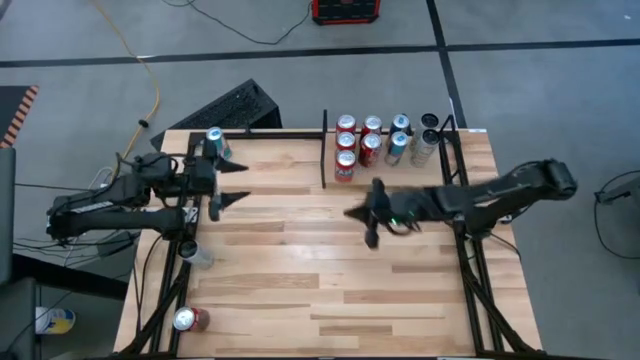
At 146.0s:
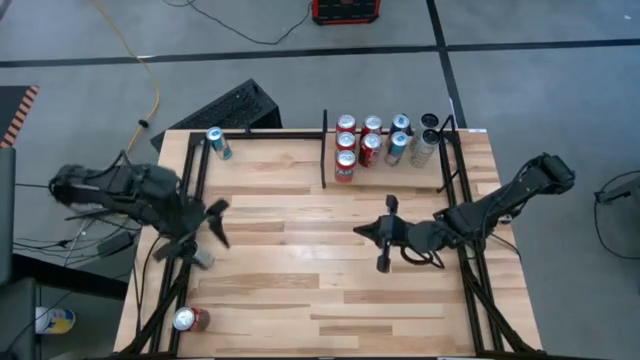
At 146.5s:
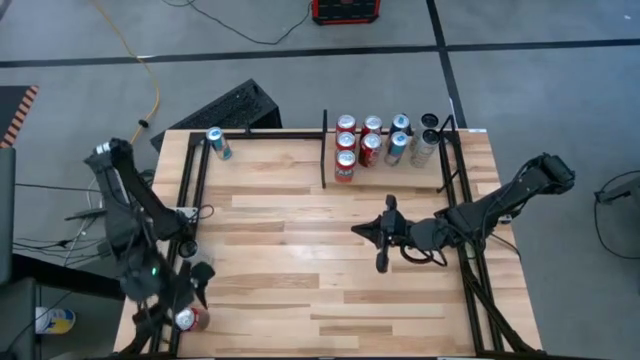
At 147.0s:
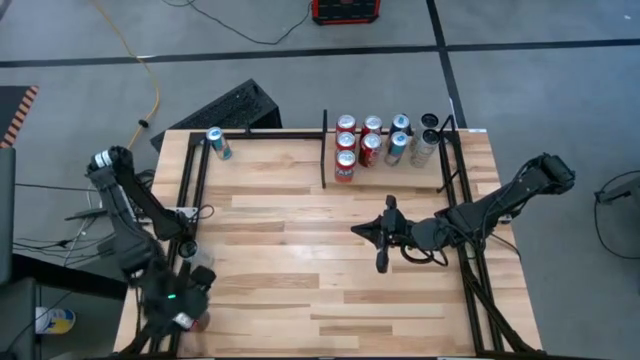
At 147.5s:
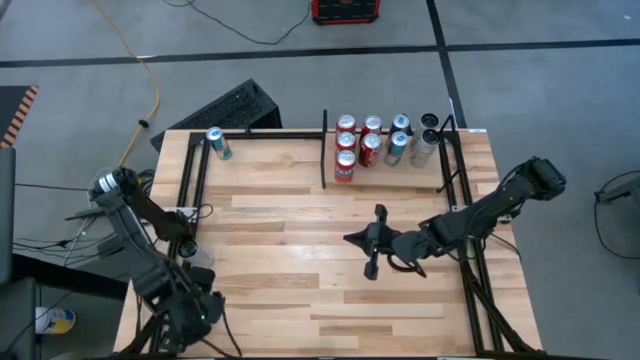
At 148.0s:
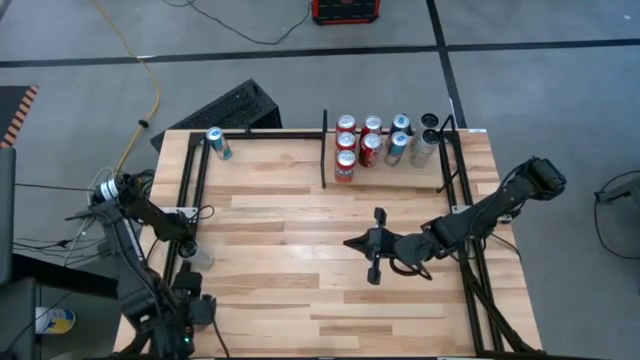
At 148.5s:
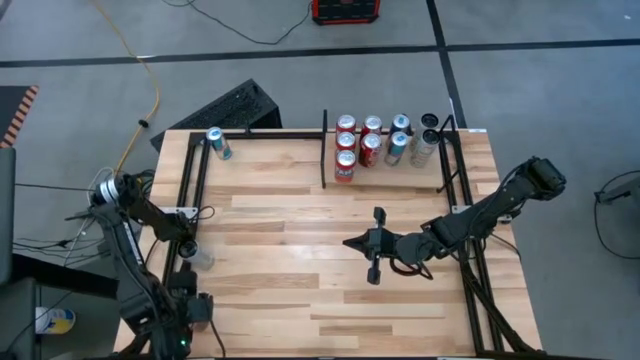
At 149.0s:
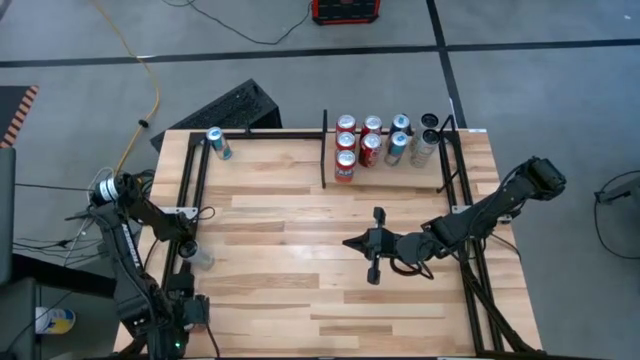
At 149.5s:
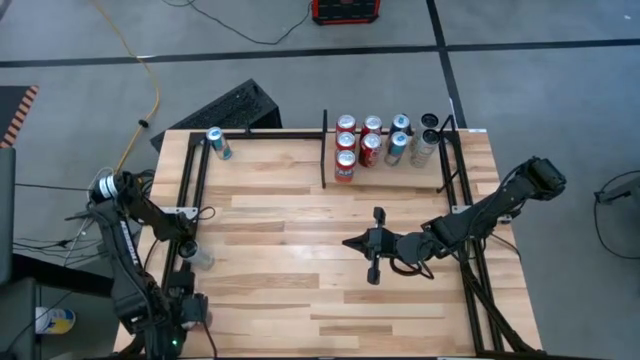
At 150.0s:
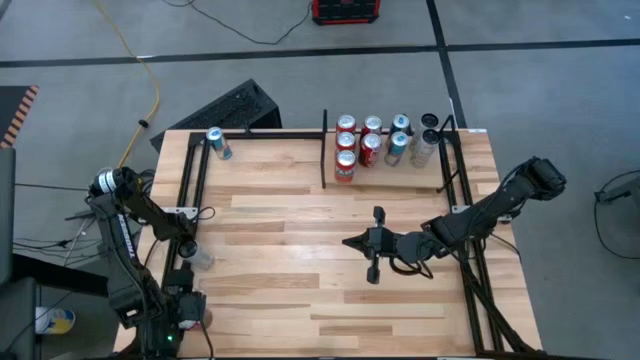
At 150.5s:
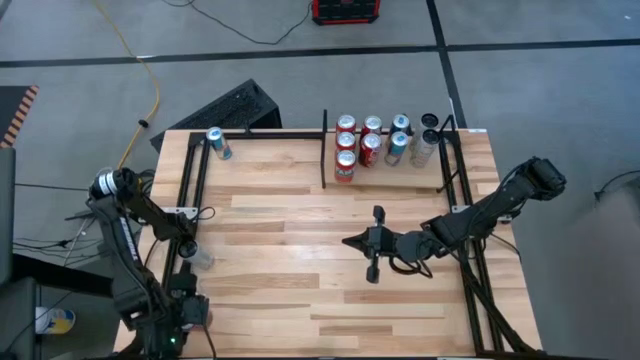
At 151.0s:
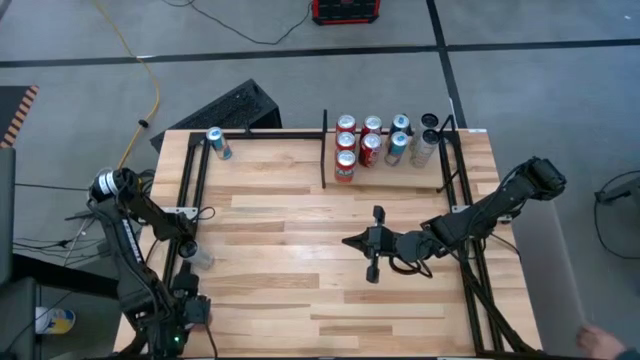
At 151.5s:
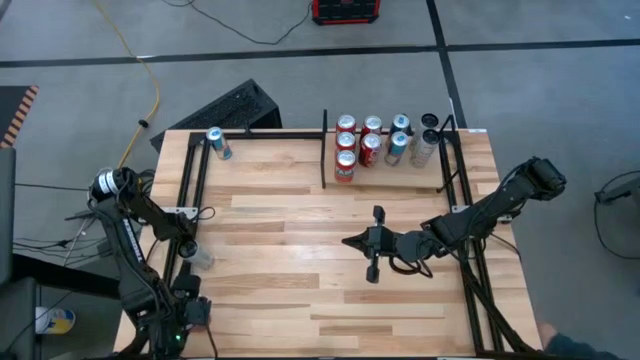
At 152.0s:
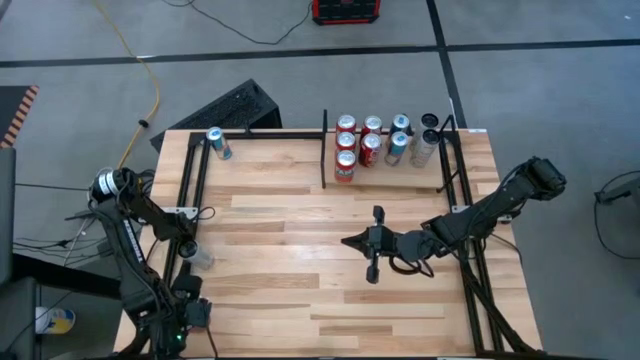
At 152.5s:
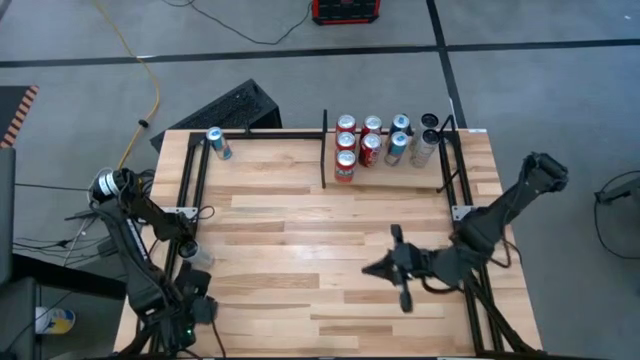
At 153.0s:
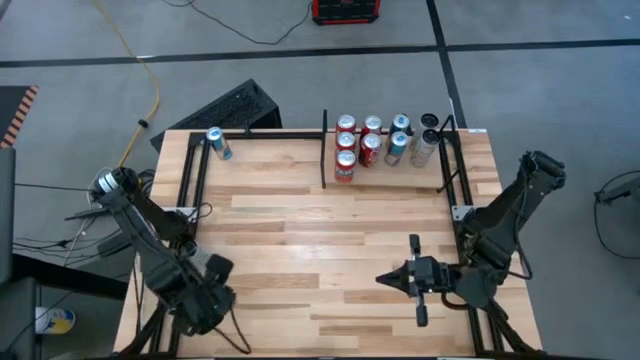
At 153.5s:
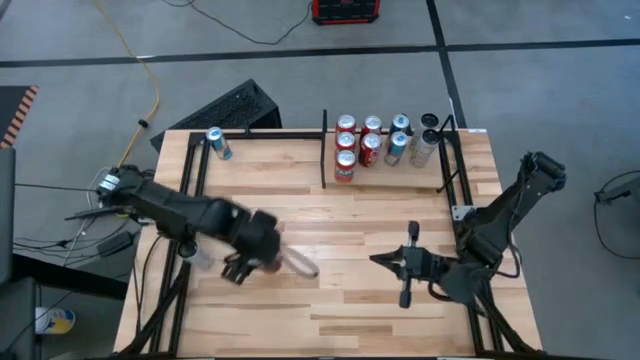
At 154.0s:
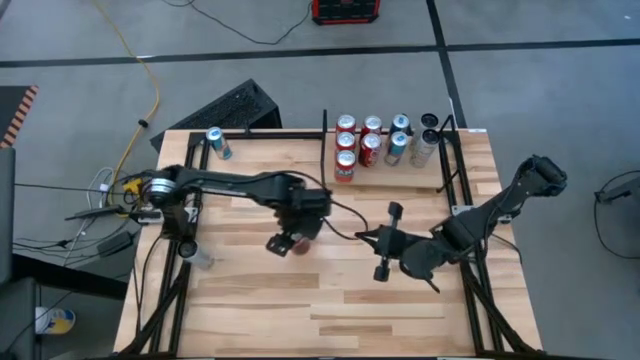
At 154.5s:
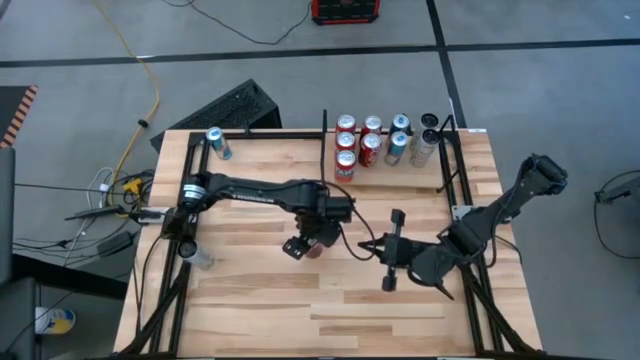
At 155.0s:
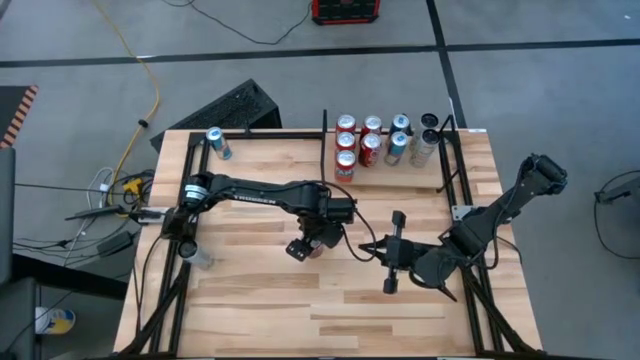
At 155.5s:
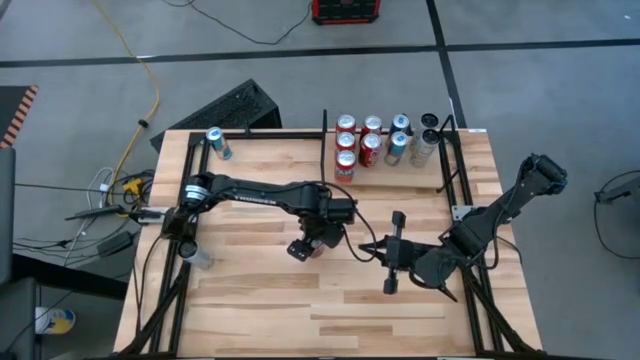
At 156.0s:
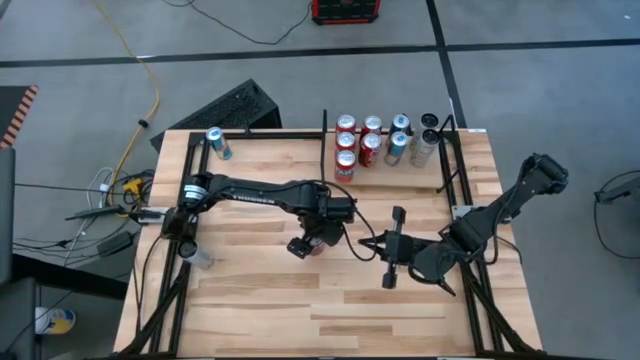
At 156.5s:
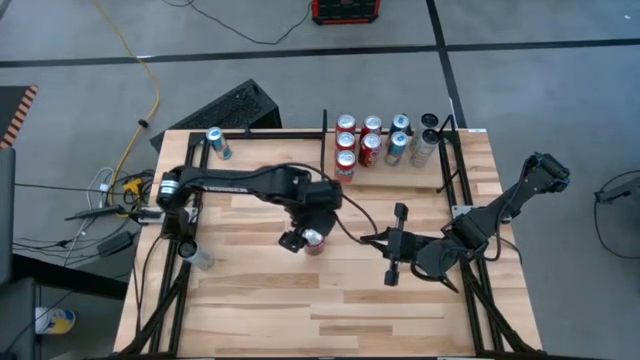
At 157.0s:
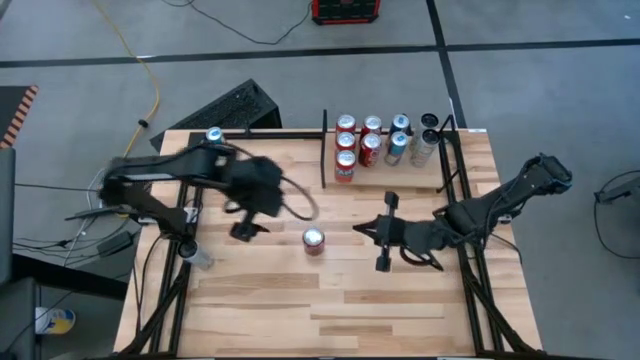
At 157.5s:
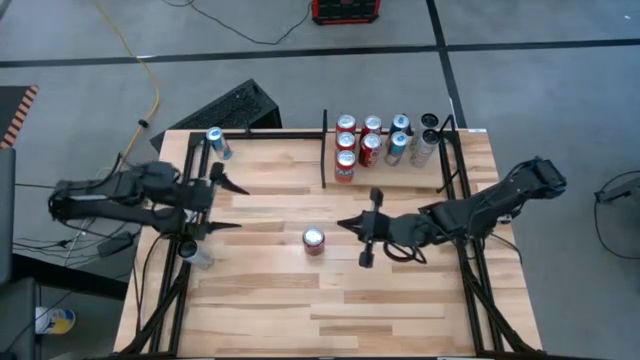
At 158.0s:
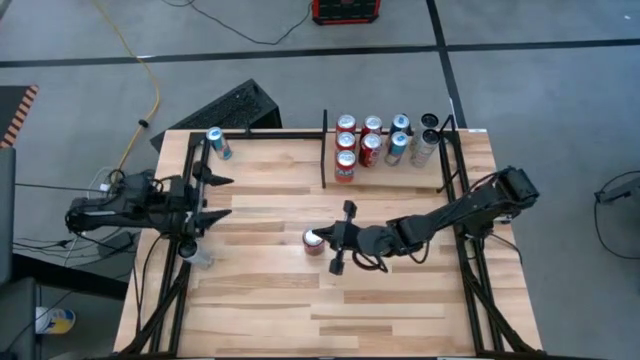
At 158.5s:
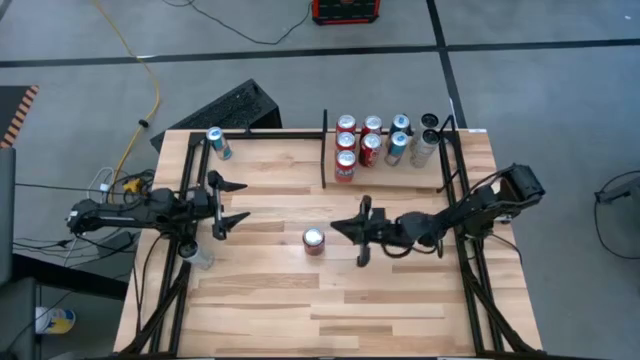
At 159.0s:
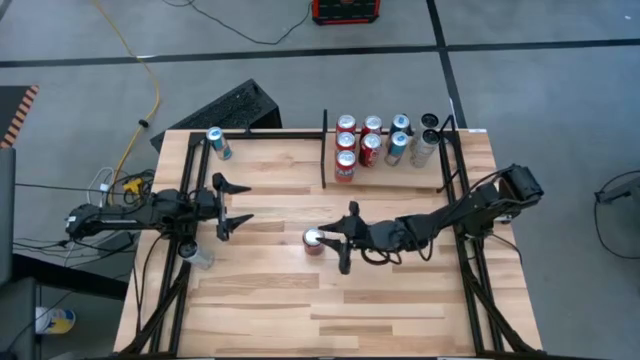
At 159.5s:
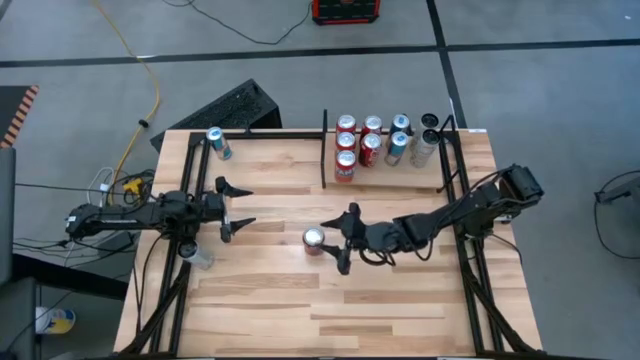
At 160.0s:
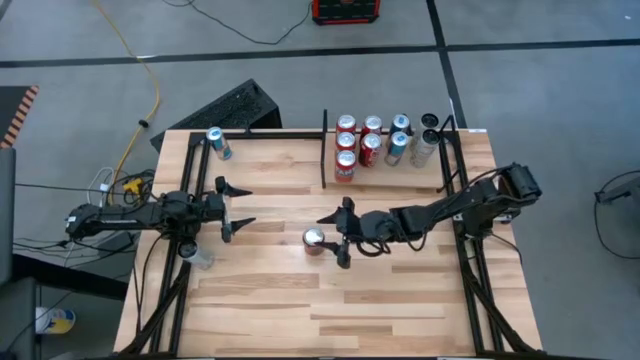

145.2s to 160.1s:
Task: Place canned beverage on shelf
Put the red-white soda can on the shelf aligned with the other soda cans

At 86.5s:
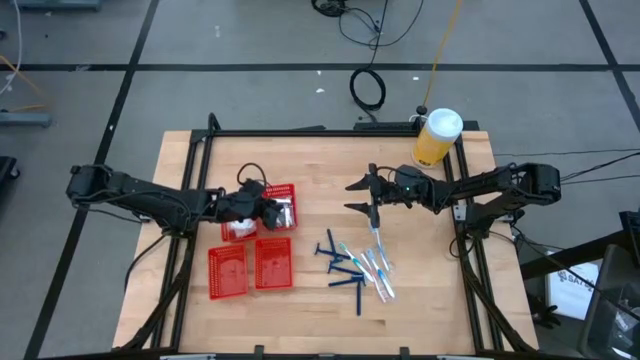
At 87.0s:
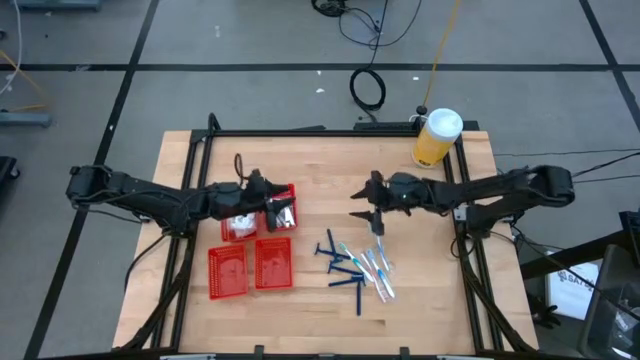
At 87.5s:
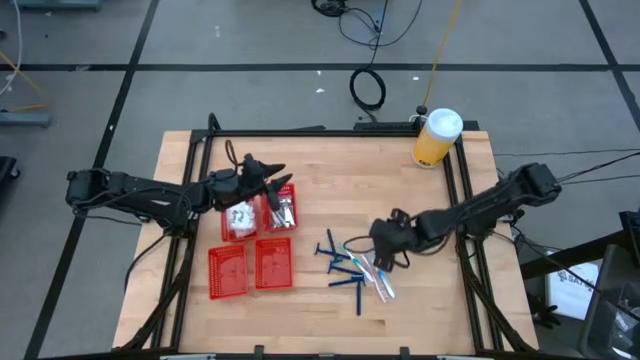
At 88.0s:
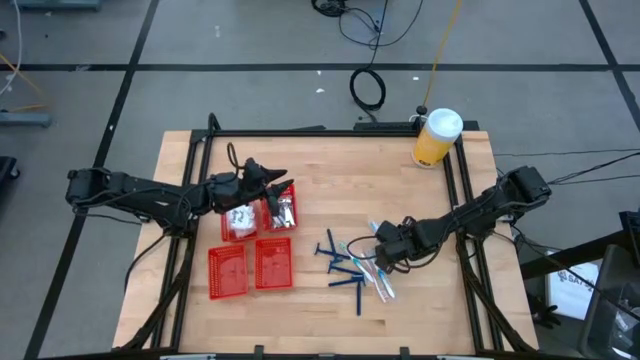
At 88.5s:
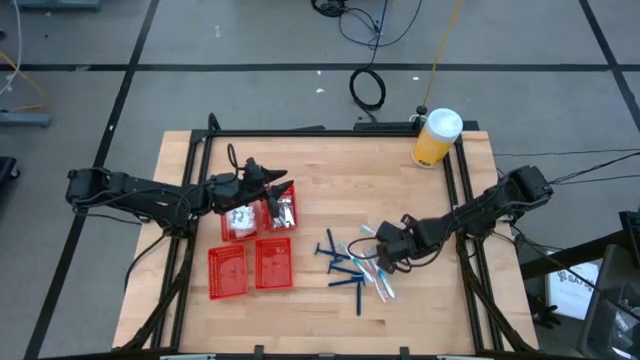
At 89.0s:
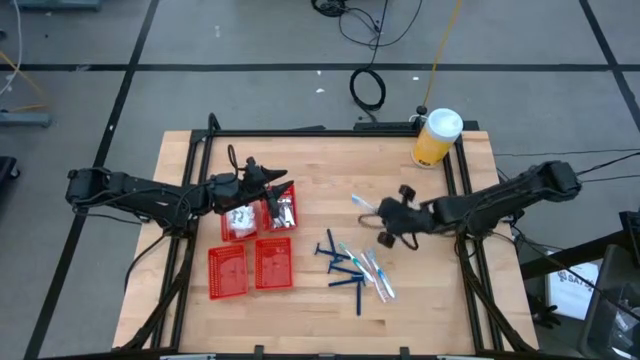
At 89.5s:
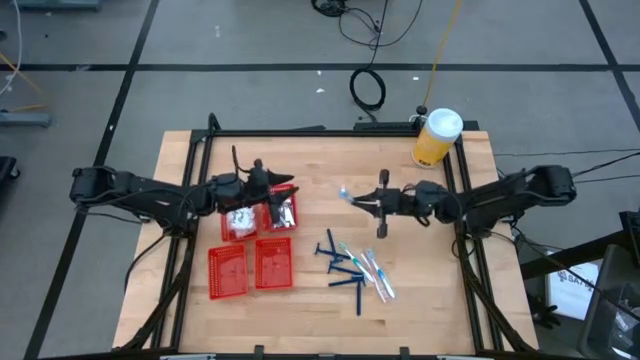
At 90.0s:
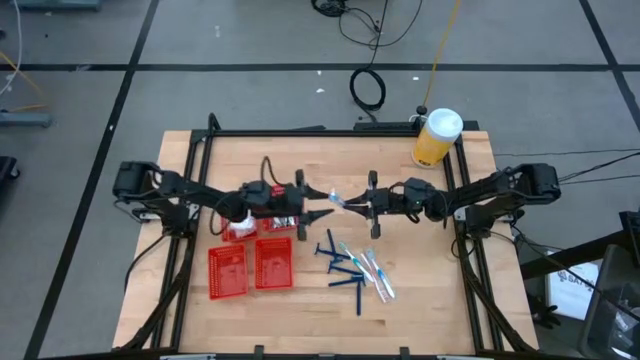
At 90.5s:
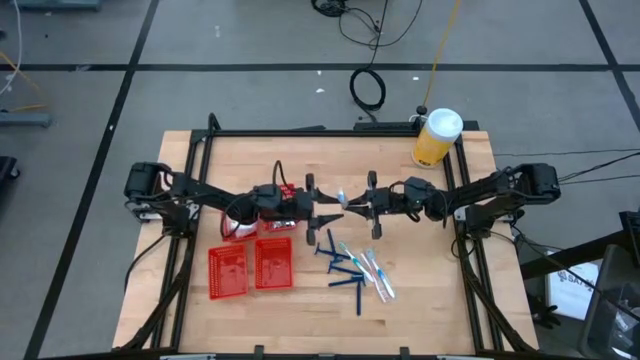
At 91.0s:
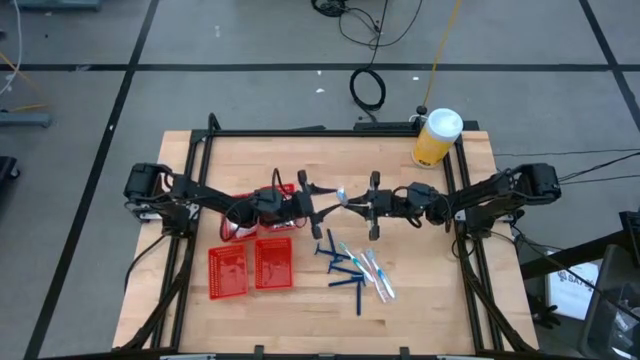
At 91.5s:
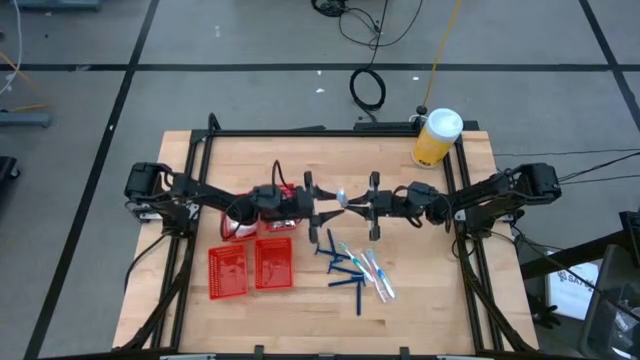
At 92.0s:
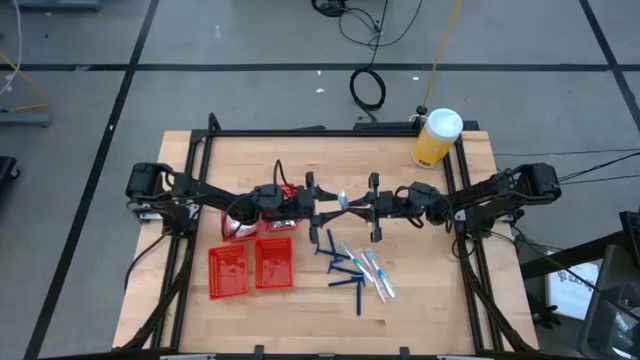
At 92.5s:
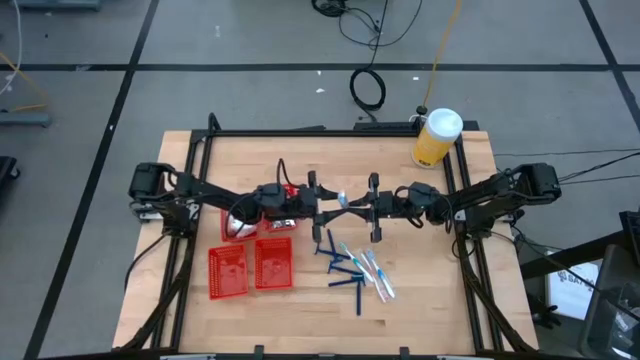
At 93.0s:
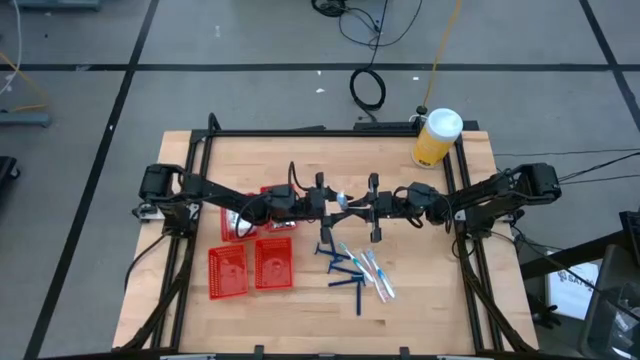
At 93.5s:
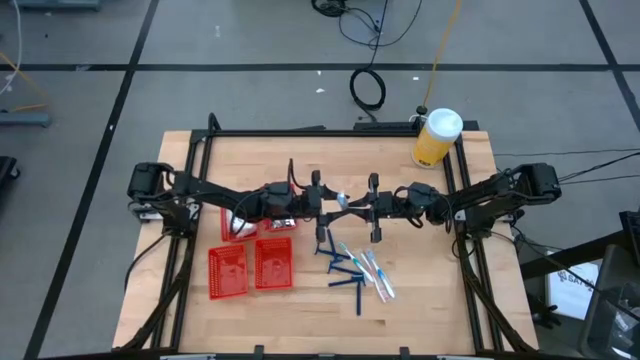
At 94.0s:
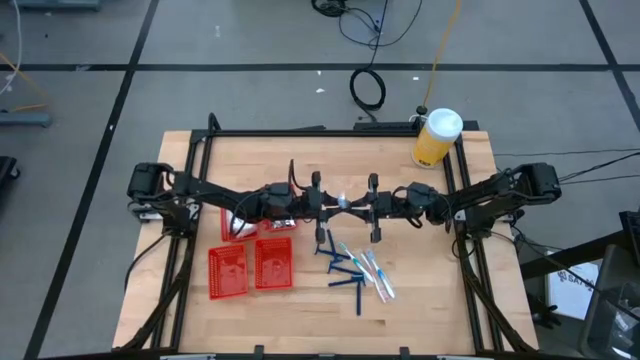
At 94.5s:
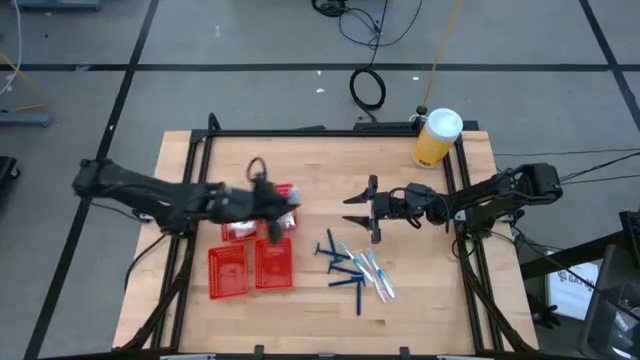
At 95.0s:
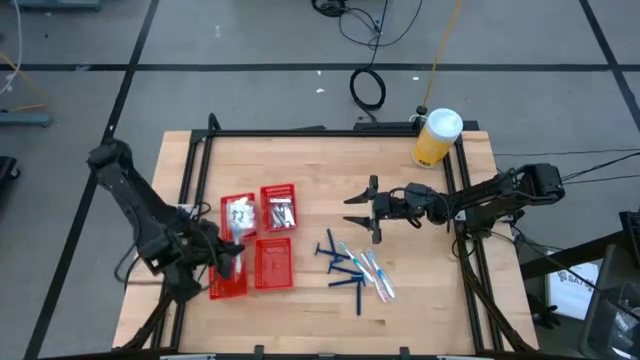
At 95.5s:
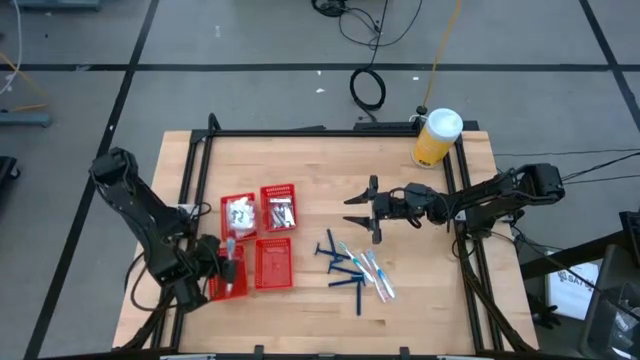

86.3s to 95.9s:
Task: Pick & Place Travel size toiletries
Put the blue toothbrush into the bottom left red basket
